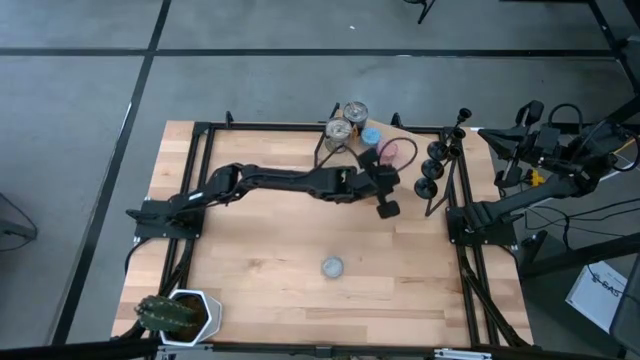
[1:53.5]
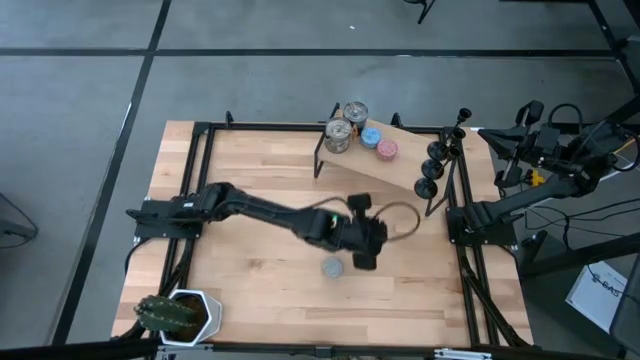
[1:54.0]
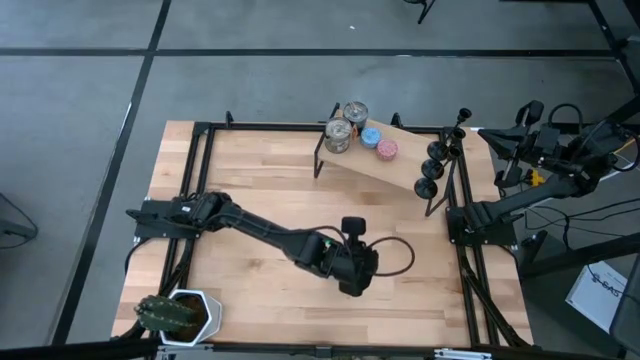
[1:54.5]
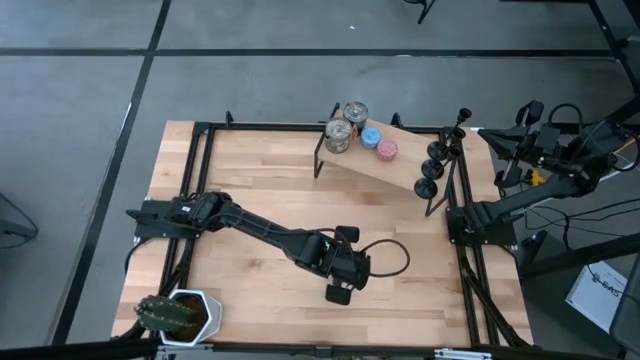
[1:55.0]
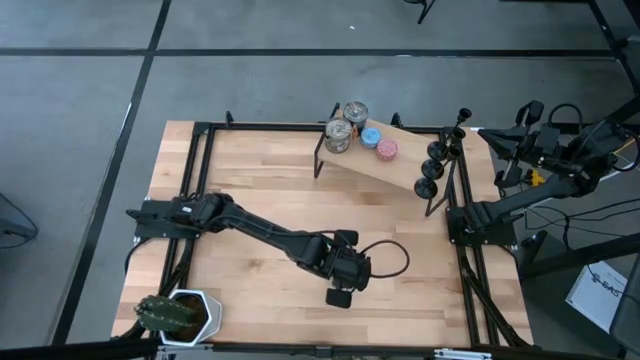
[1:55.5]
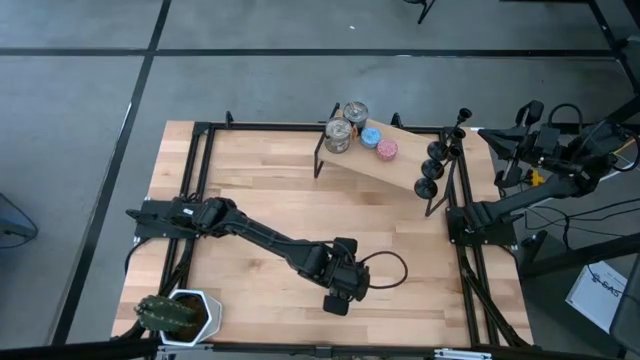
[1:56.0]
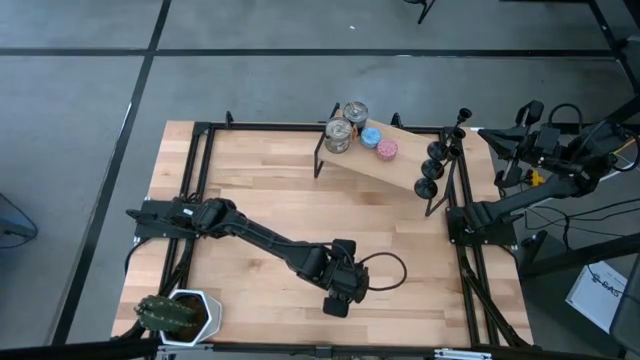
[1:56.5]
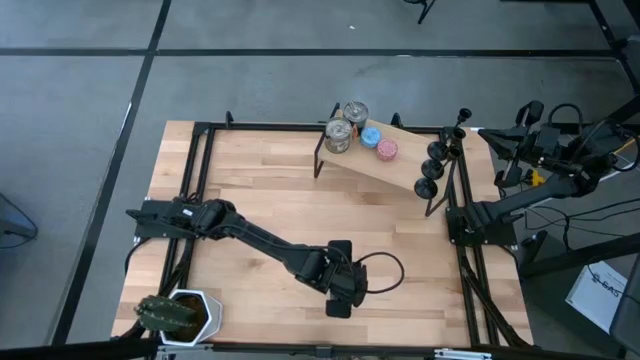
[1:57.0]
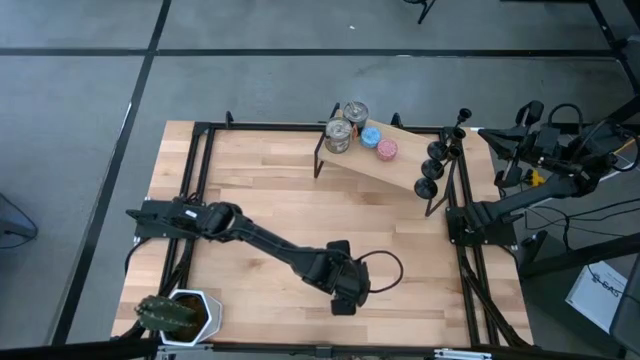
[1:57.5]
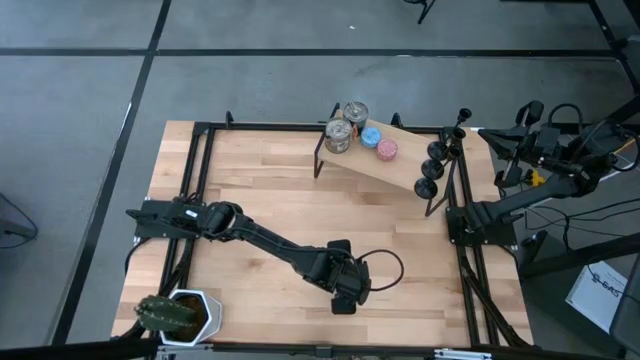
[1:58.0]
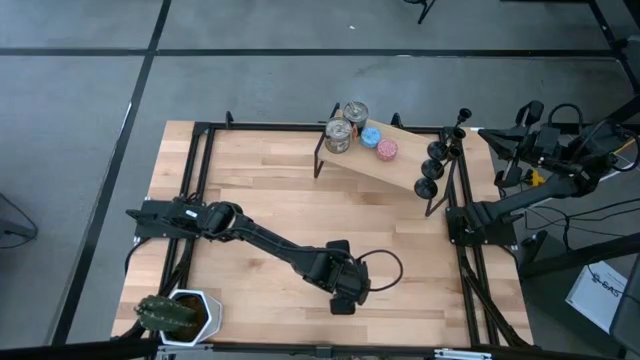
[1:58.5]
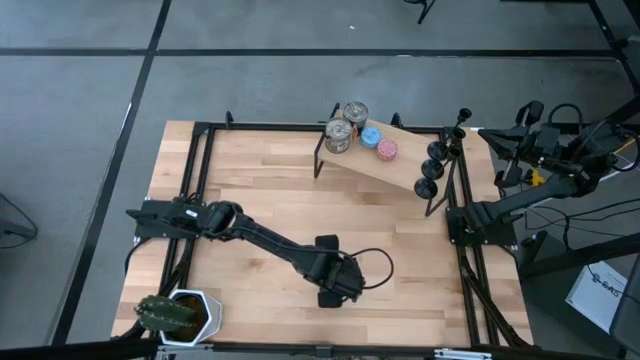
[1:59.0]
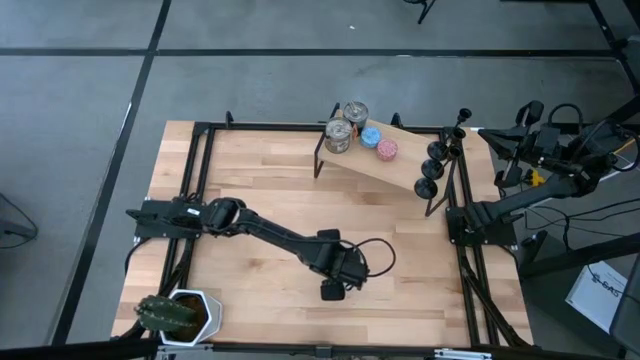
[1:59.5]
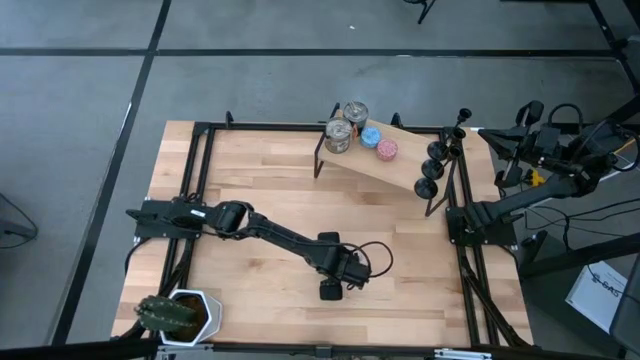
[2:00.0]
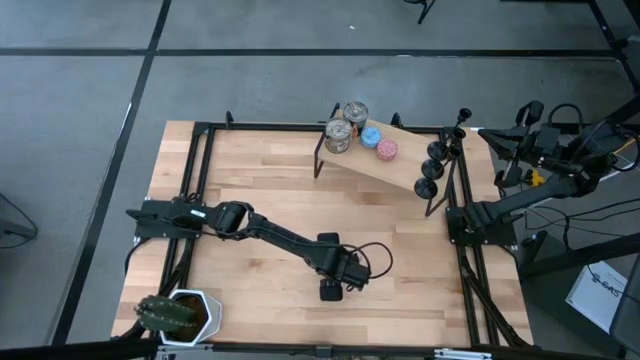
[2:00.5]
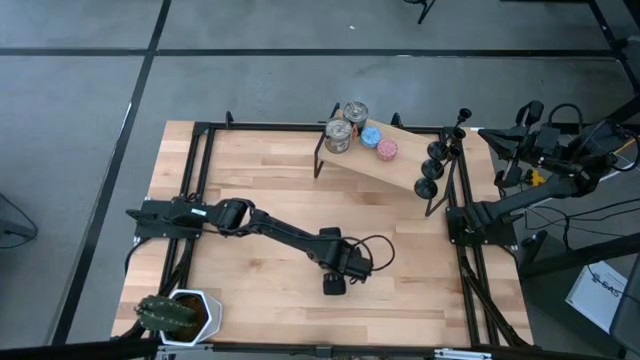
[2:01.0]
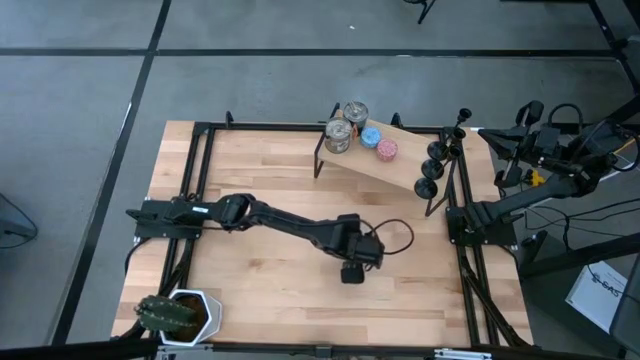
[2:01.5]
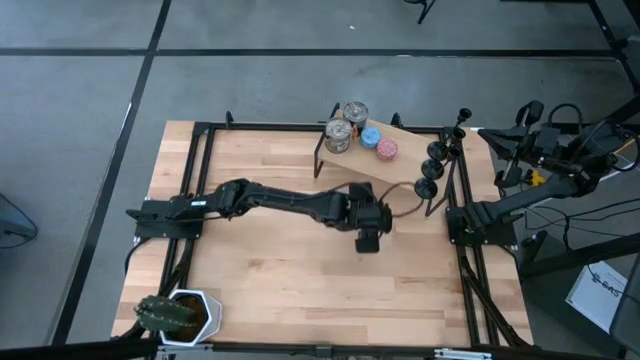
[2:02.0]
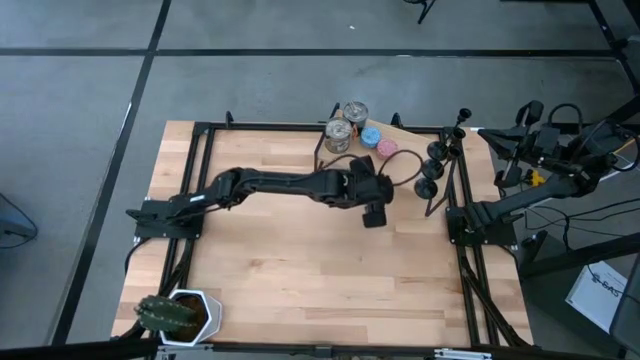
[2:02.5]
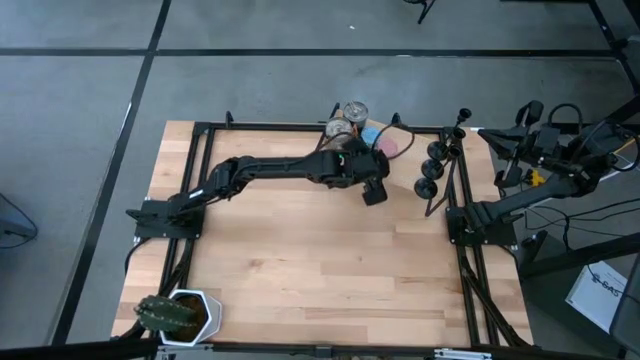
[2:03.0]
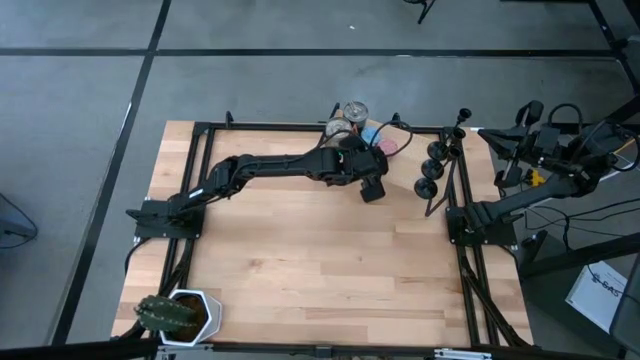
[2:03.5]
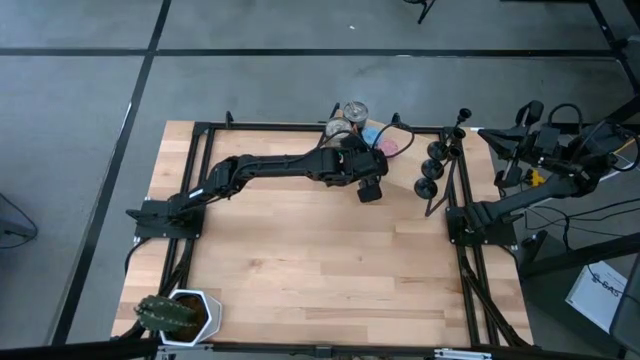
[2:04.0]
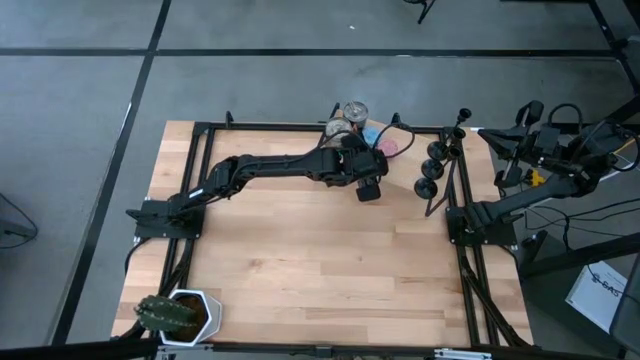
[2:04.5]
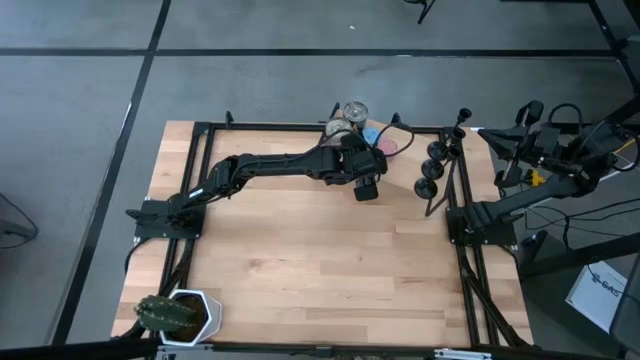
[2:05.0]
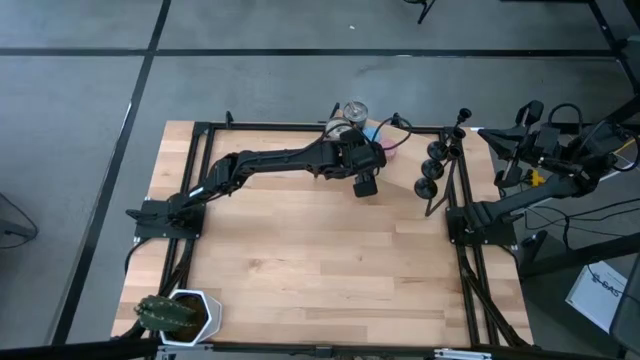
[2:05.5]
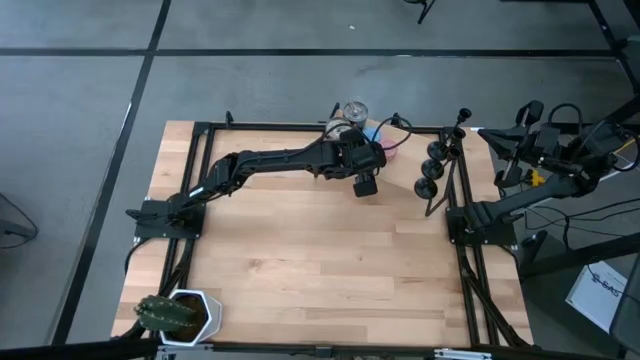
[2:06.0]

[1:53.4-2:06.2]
Task: Pick & Place candle stick holders
Put the light blue patterned scented candle on the shelf

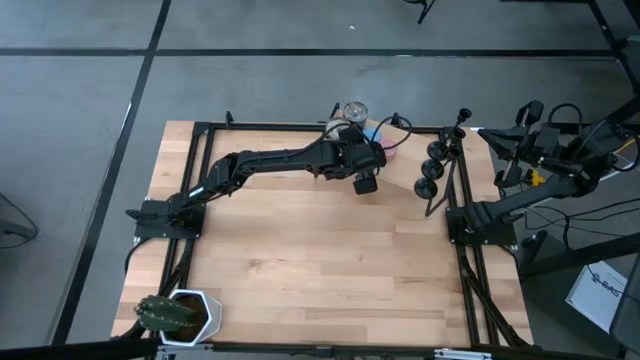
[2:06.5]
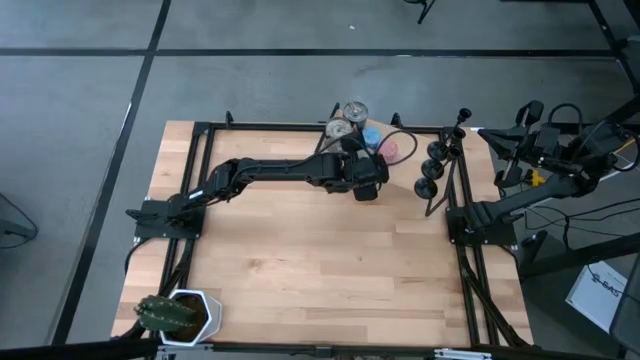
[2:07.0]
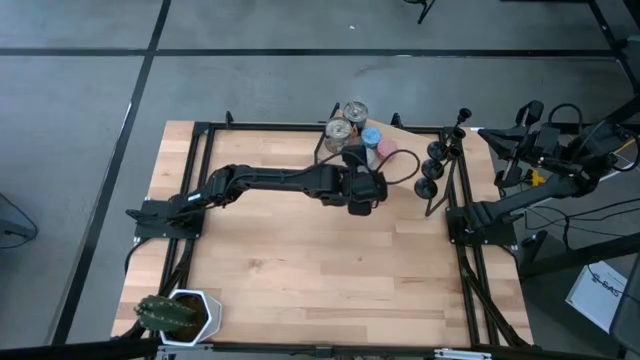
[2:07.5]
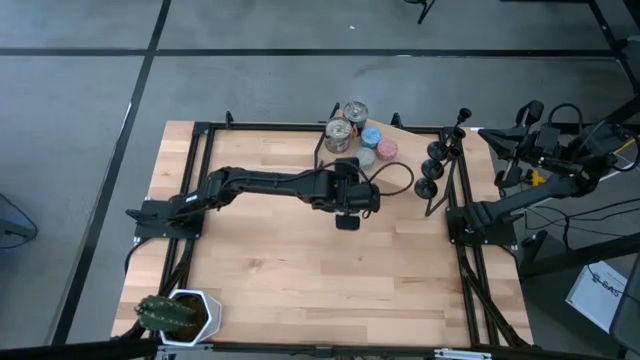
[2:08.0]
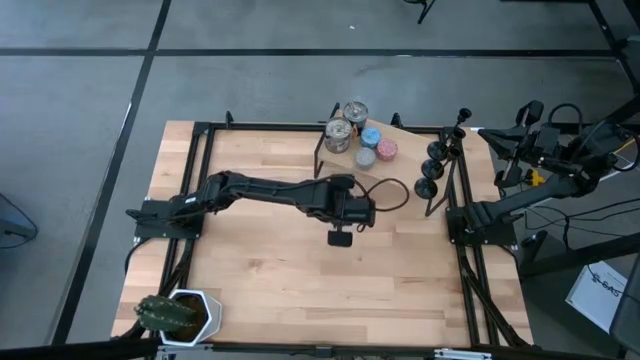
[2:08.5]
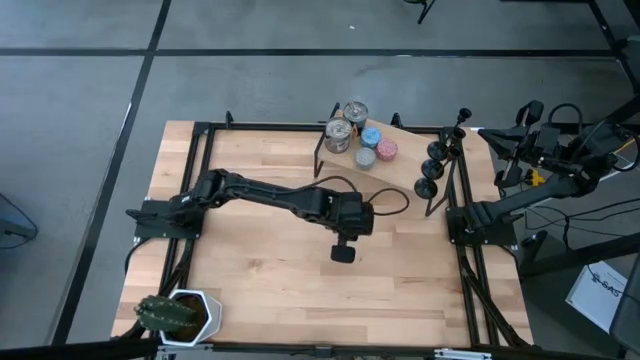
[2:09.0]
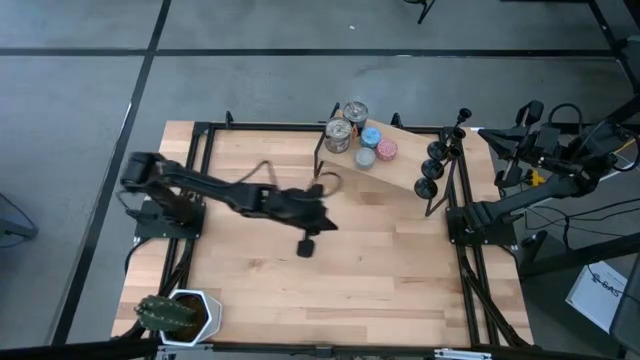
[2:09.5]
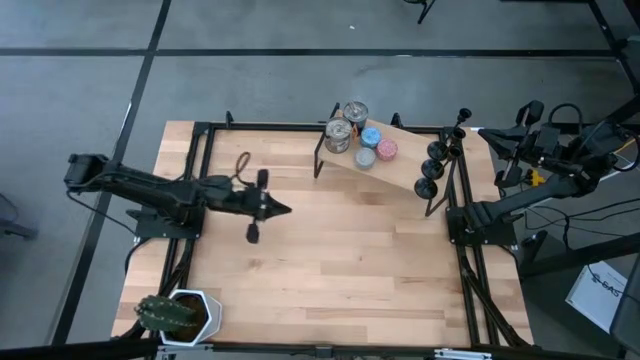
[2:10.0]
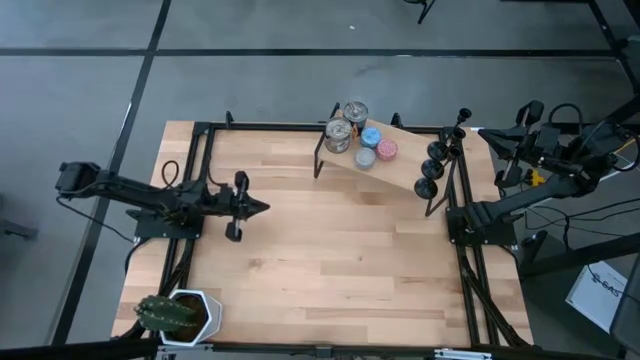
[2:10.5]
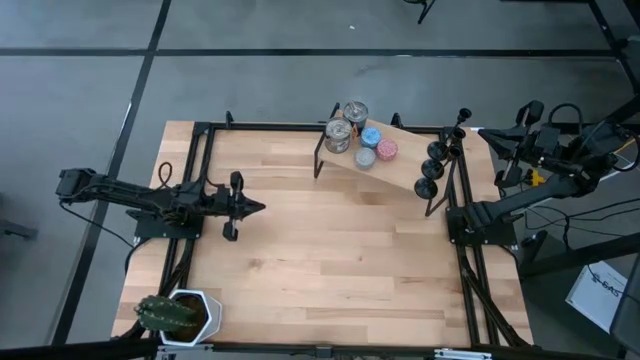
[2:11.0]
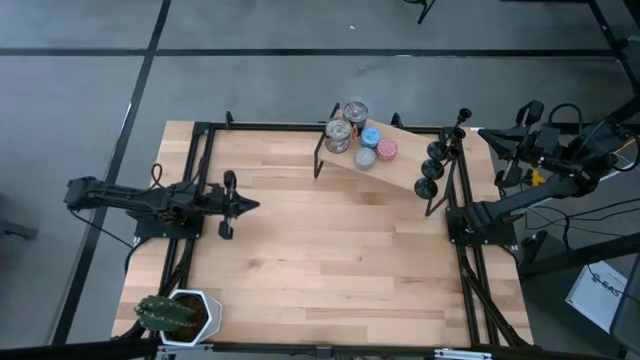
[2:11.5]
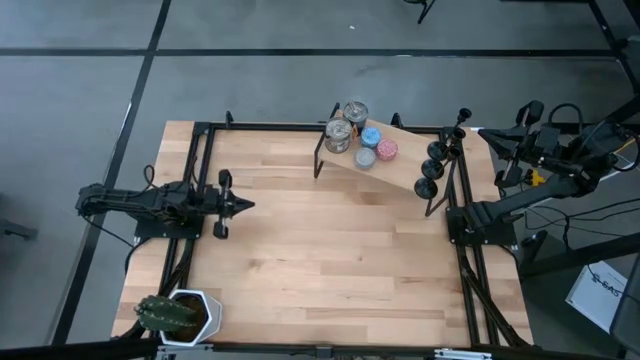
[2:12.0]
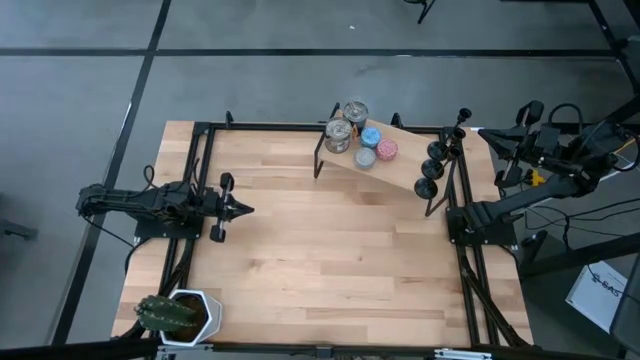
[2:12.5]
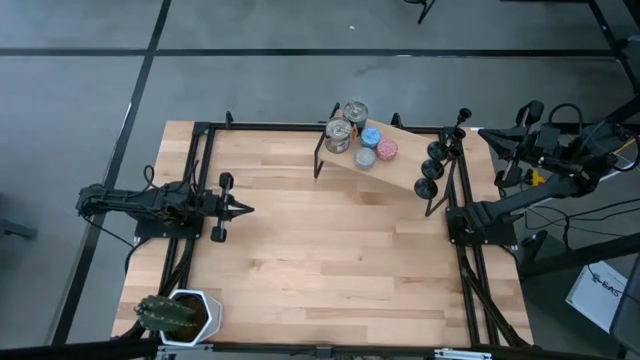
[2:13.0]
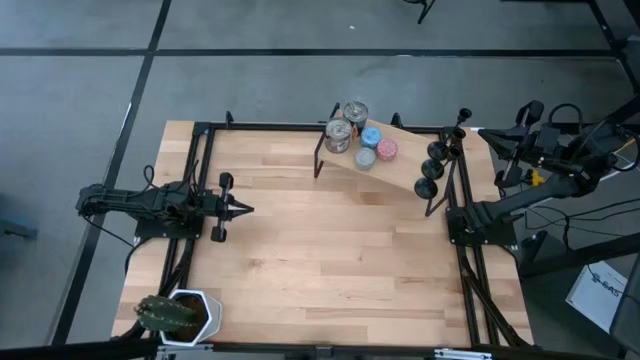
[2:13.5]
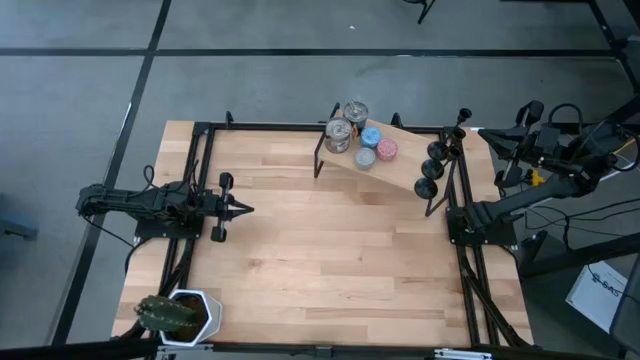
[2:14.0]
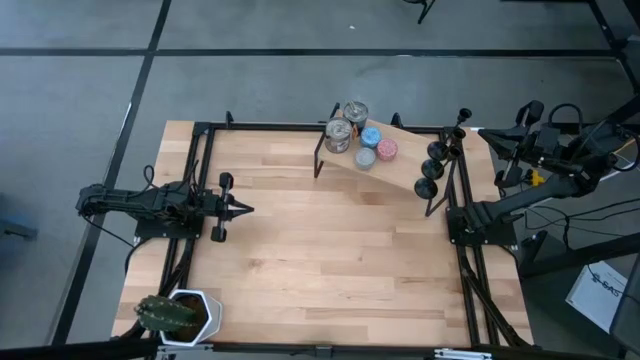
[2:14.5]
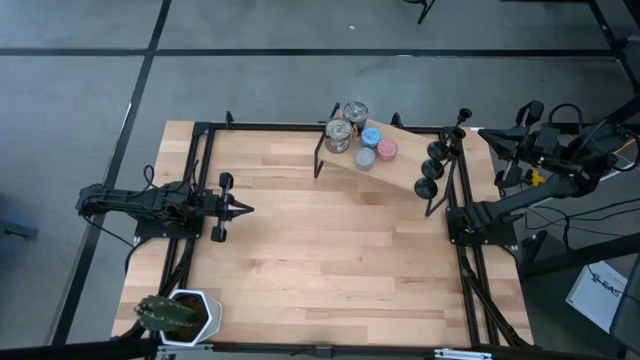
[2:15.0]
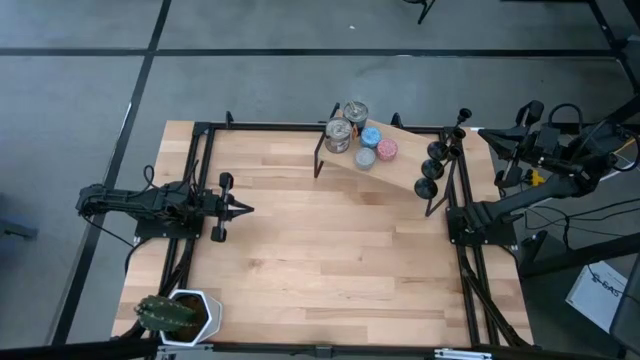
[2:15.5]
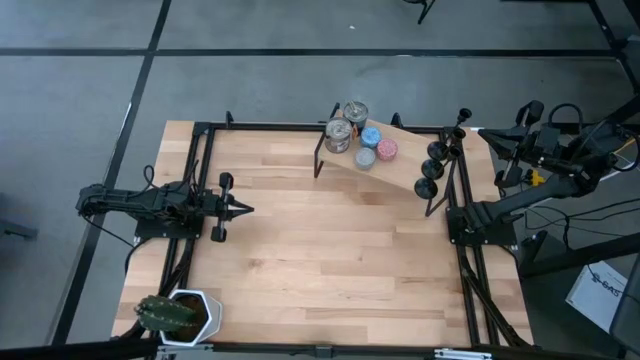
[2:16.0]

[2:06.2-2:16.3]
Return to Home Position
